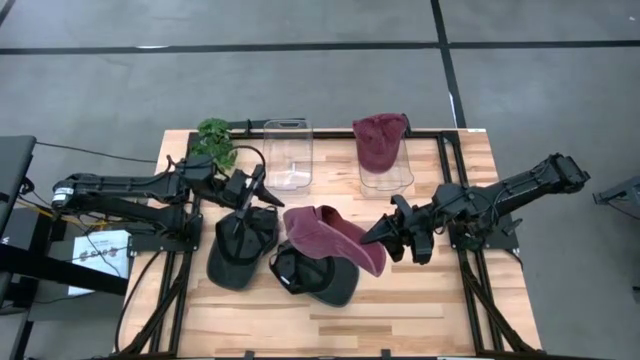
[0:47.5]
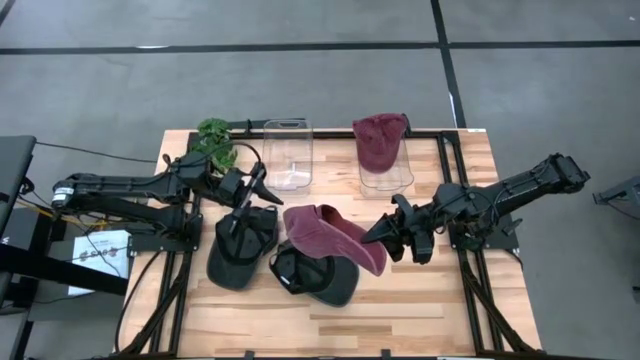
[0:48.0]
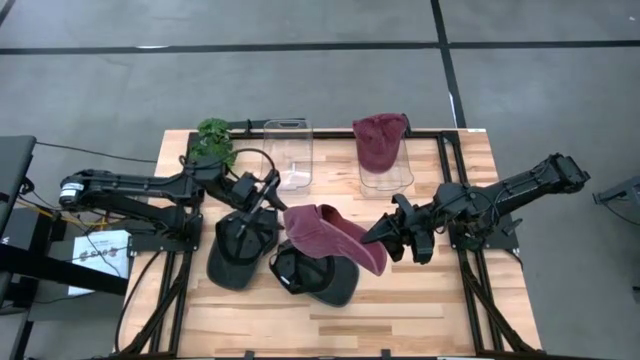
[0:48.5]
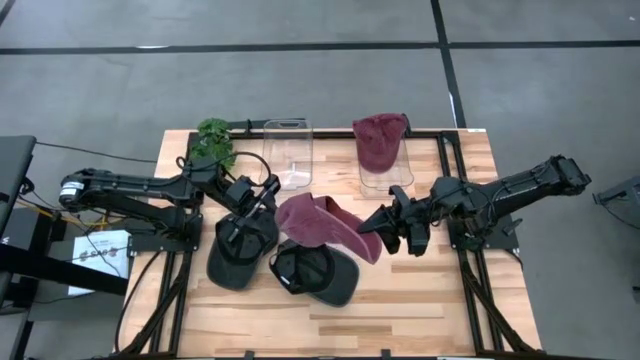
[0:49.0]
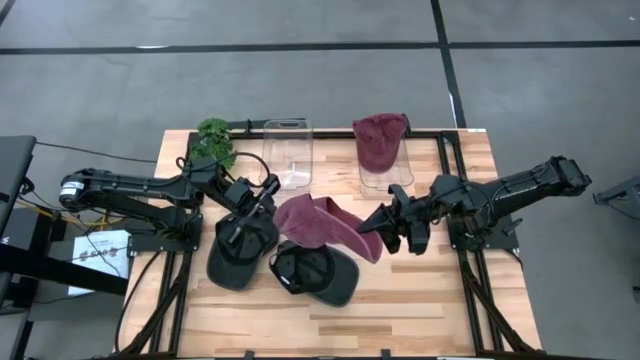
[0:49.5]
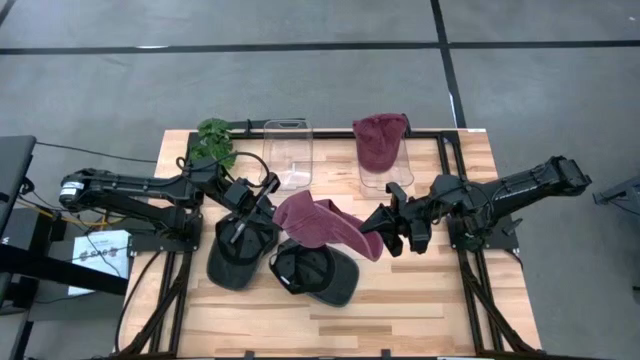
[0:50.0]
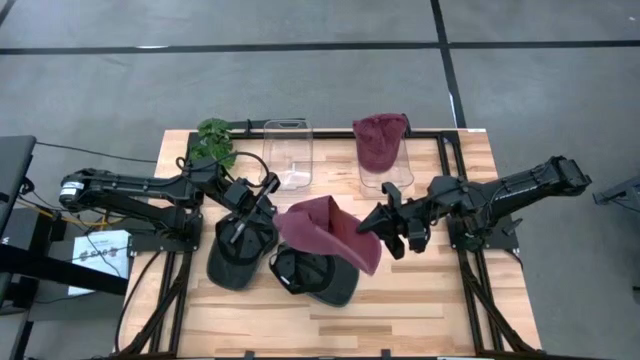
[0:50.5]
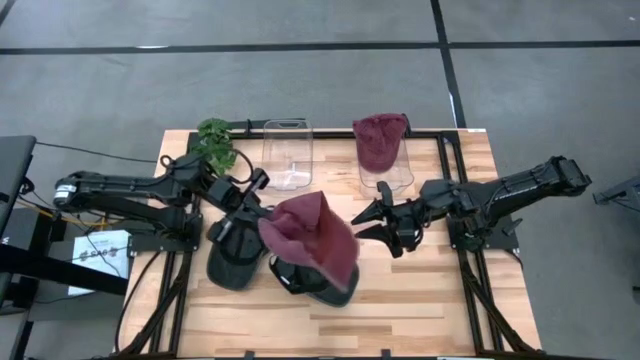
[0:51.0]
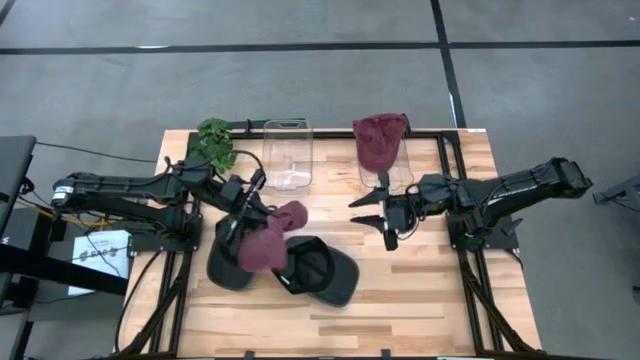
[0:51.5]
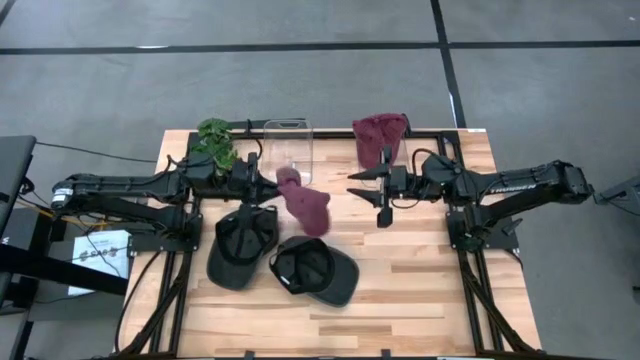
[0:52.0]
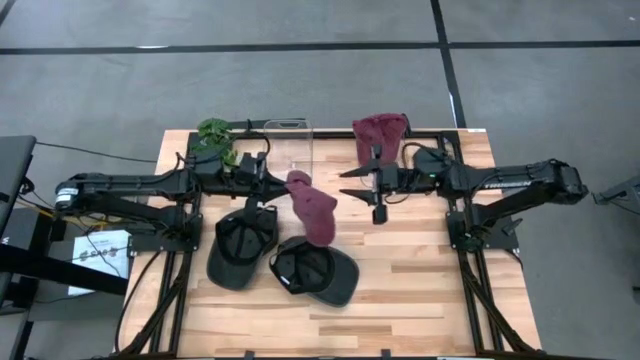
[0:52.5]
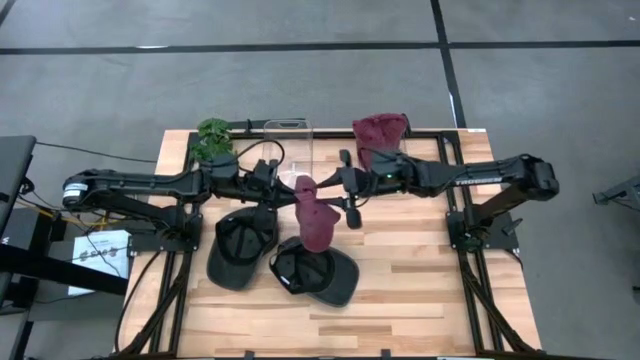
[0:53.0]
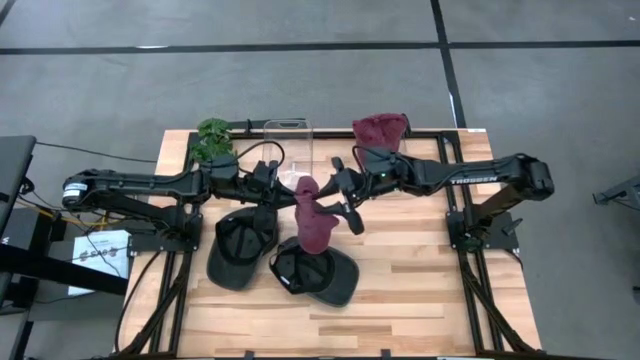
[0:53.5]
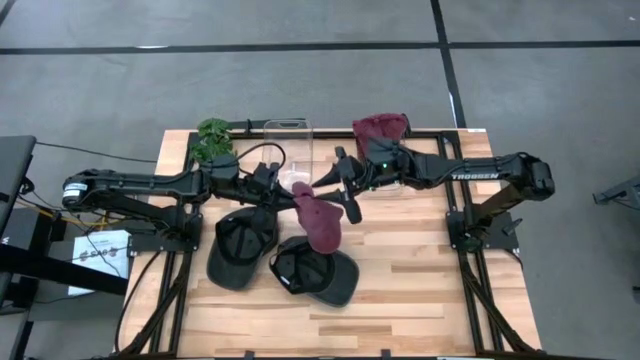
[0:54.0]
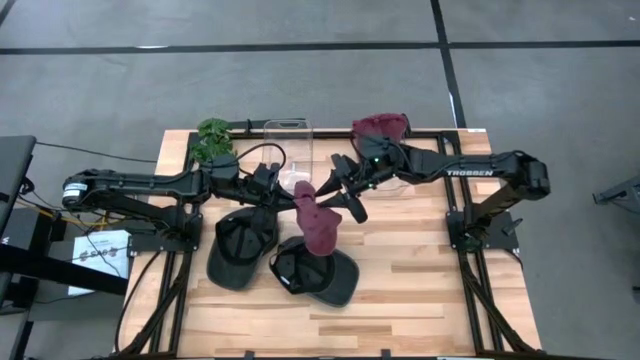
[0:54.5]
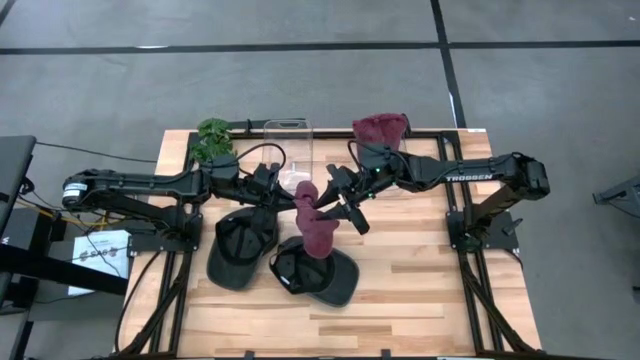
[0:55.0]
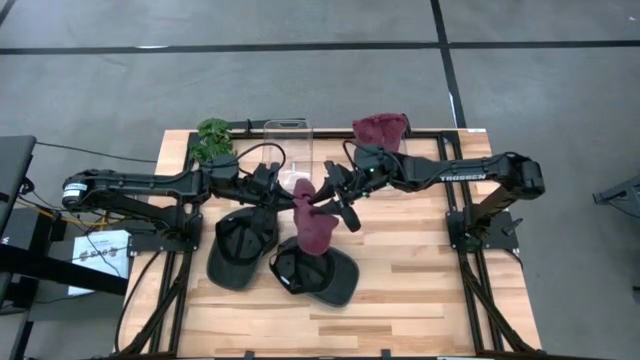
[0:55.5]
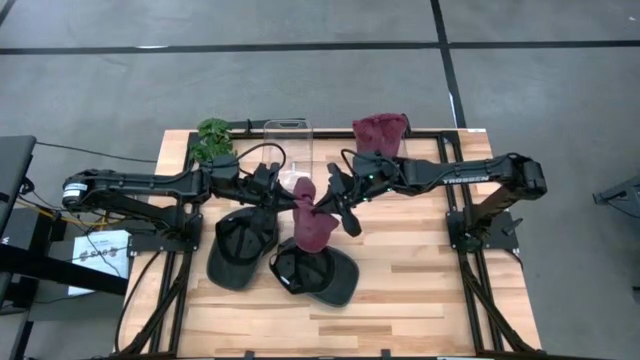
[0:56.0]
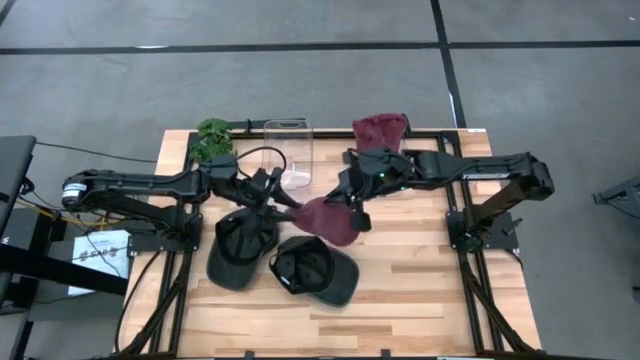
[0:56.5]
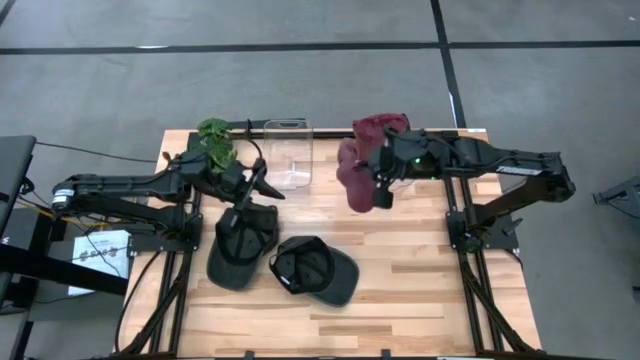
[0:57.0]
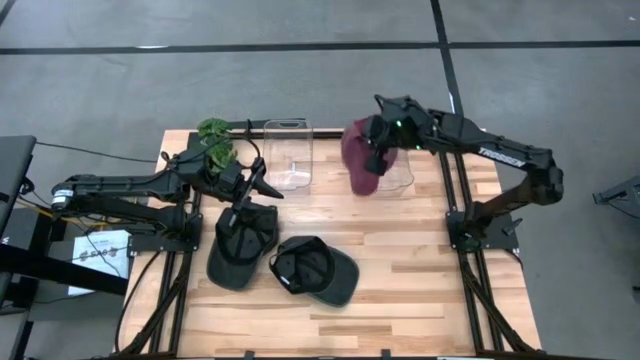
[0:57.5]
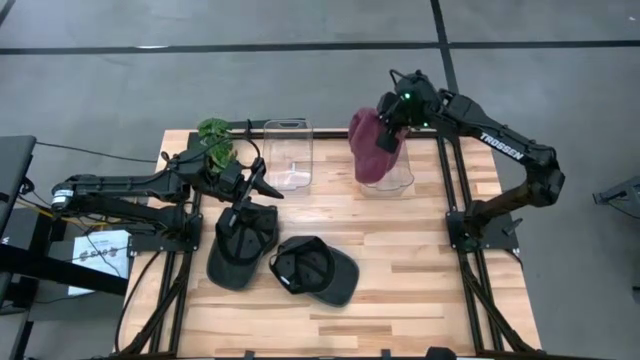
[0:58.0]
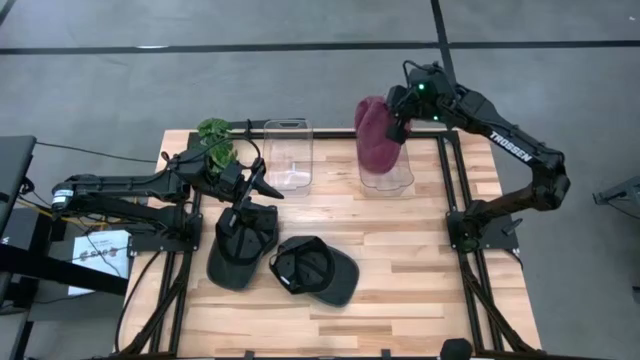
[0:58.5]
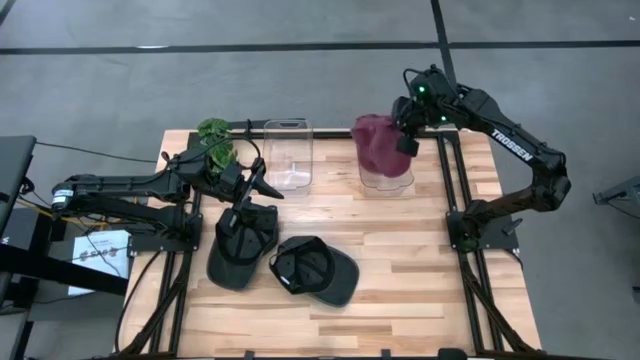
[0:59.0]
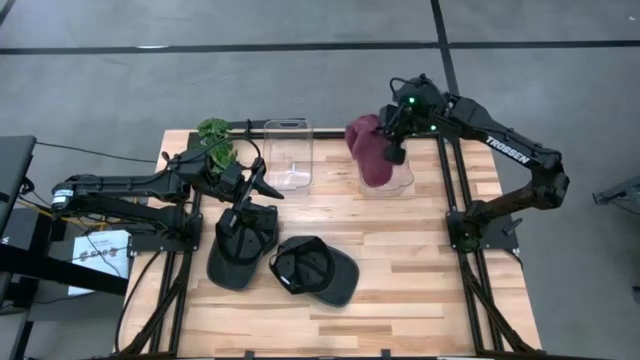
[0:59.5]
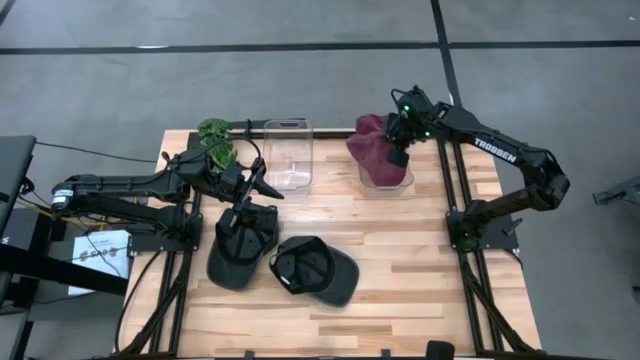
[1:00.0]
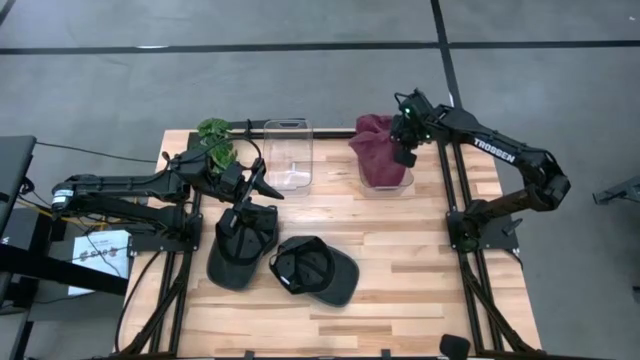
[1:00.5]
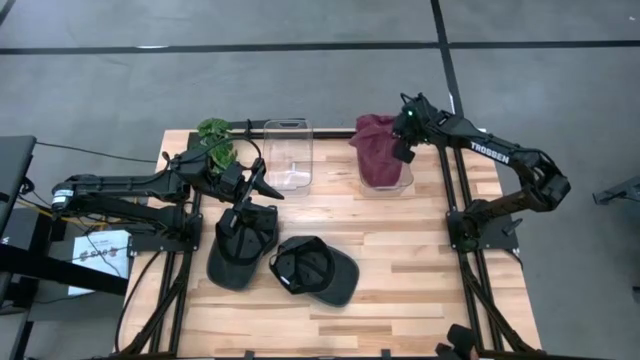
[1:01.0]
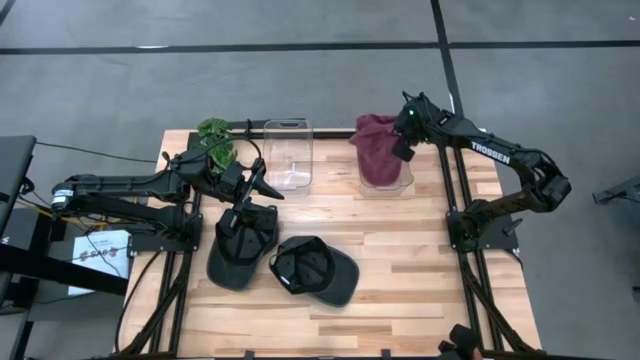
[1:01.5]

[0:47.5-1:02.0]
Task: Pick & Place hat
Put the red cap into the right transparent bin

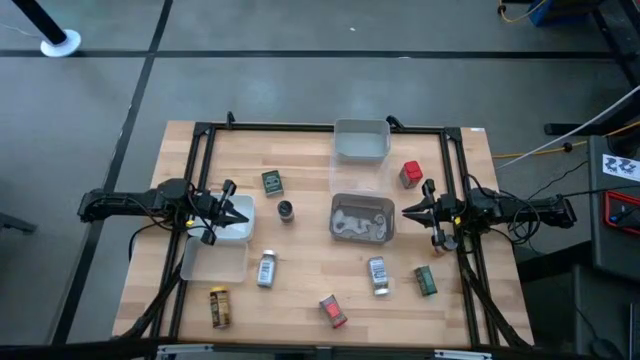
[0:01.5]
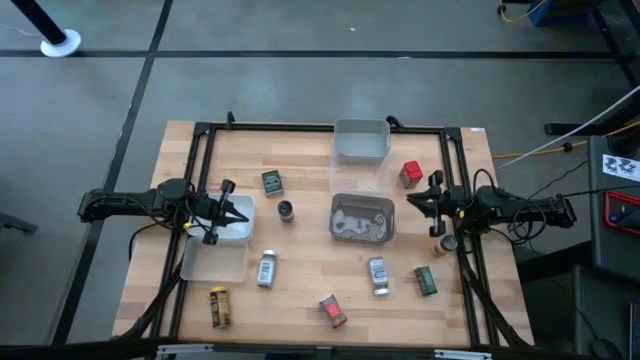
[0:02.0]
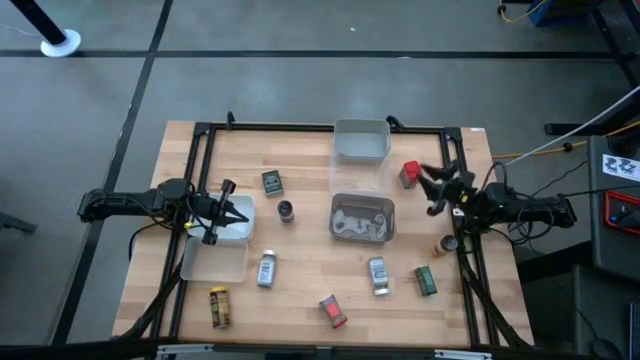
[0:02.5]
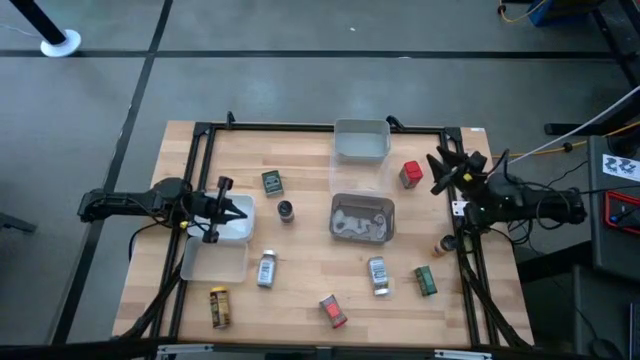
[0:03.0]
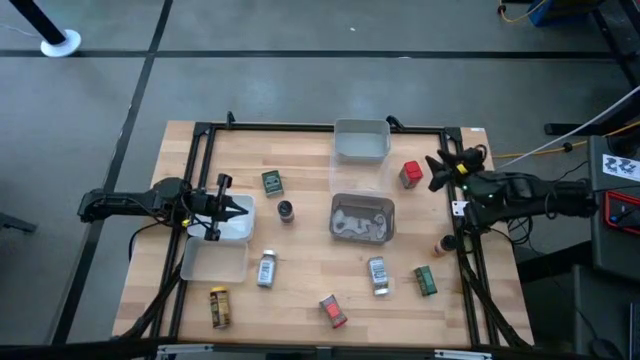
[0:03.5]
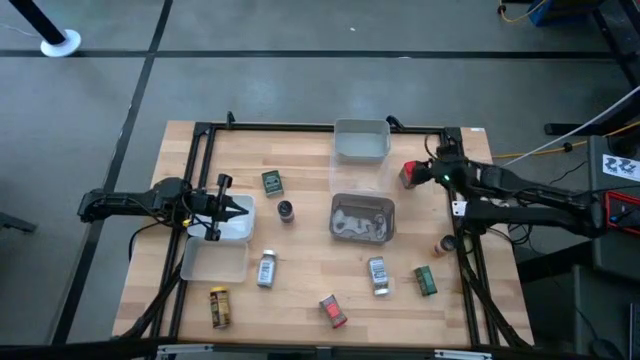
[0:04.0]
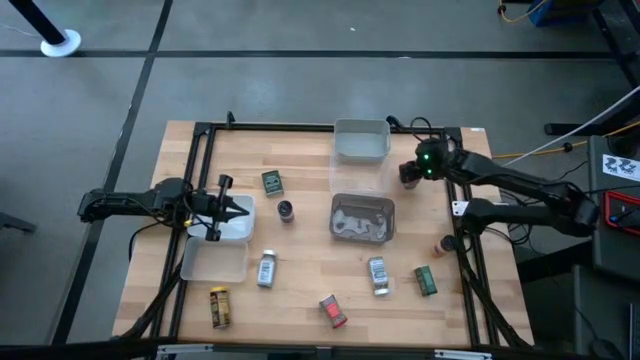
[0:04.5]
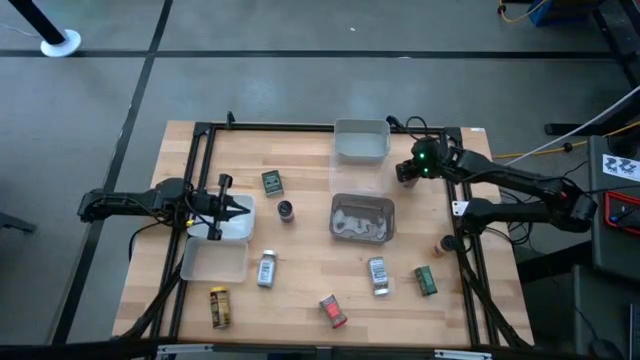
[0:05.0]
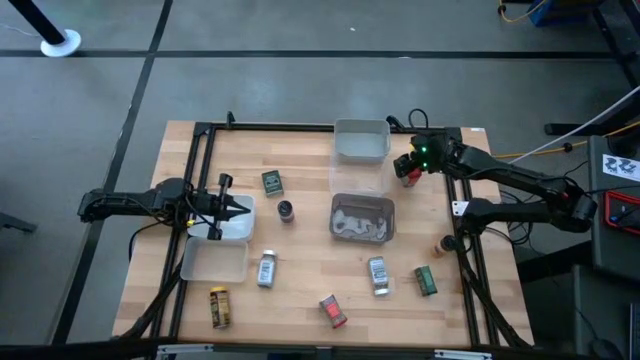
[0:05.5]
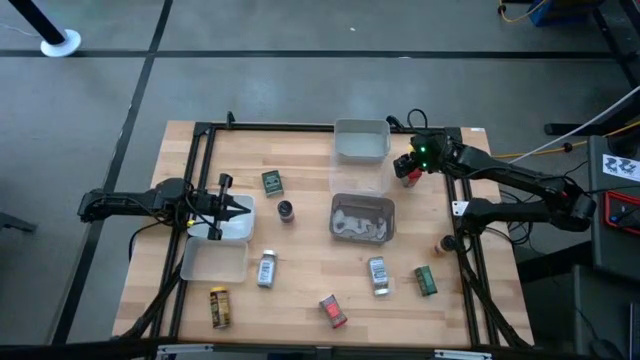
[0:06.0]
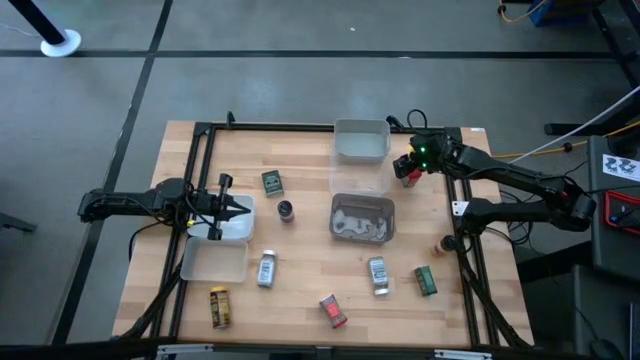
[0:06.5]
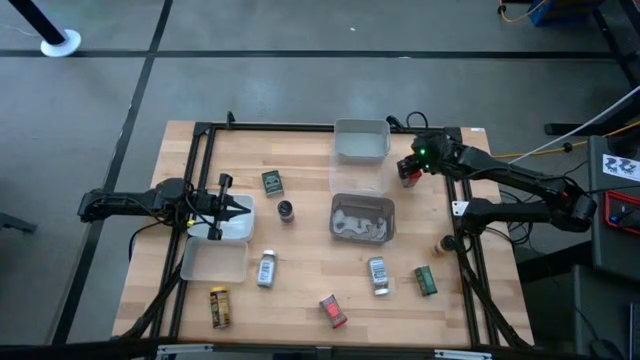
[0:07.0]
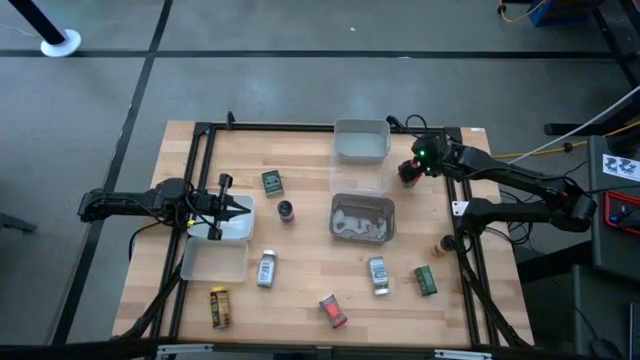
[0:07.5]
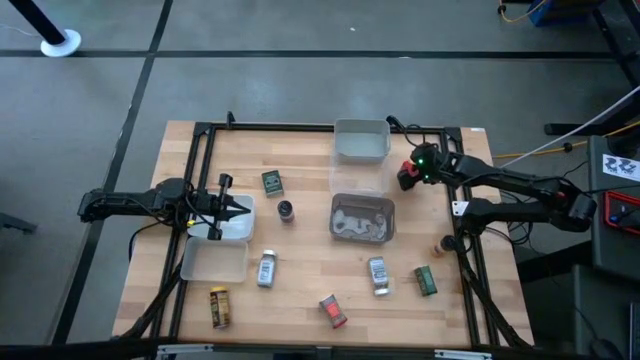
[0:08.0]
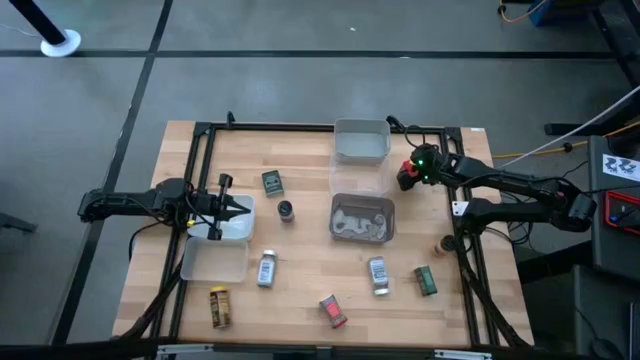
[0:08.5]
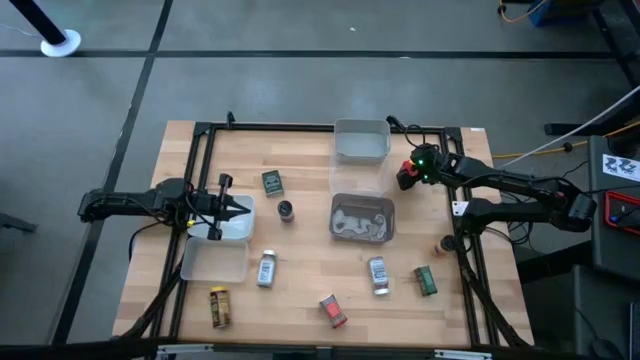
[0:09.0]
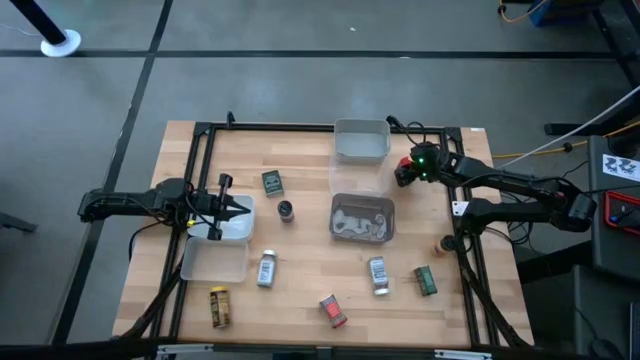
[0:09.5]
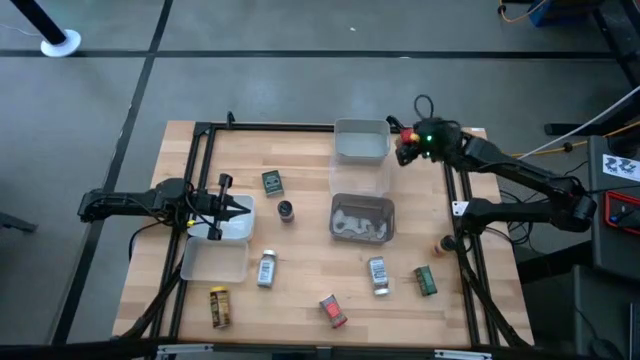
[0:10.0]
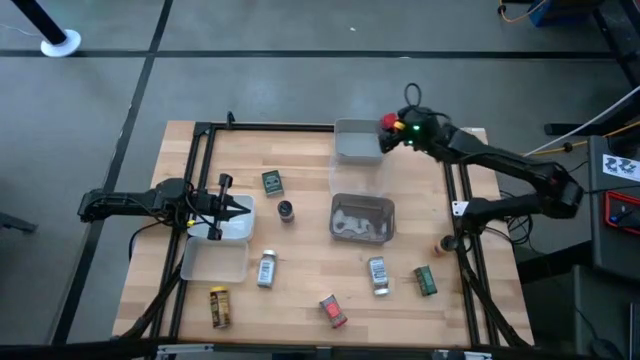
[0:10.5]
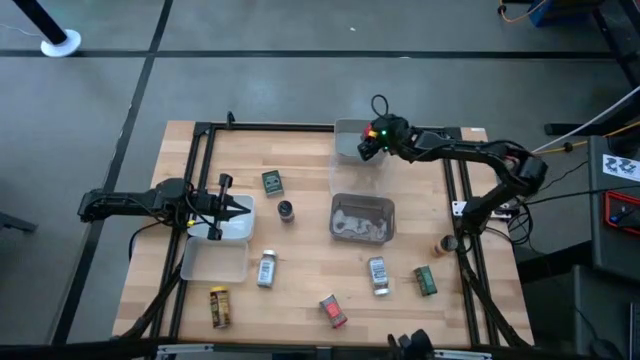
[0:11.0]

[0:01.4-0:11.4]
Task: Sort spices by type
Put the top red seasoning can into the gray bin
